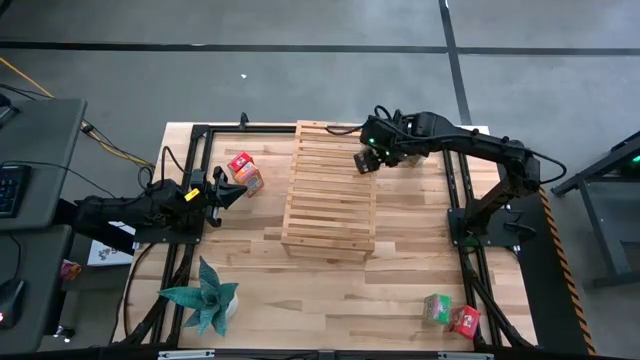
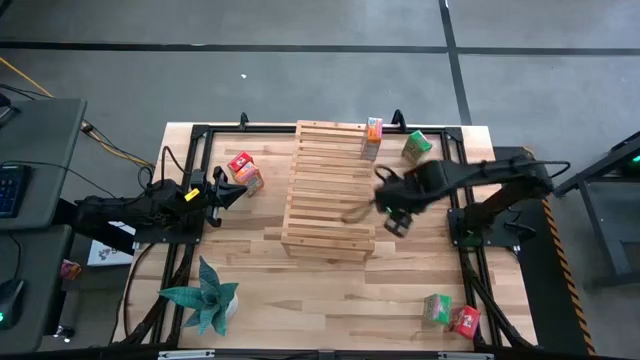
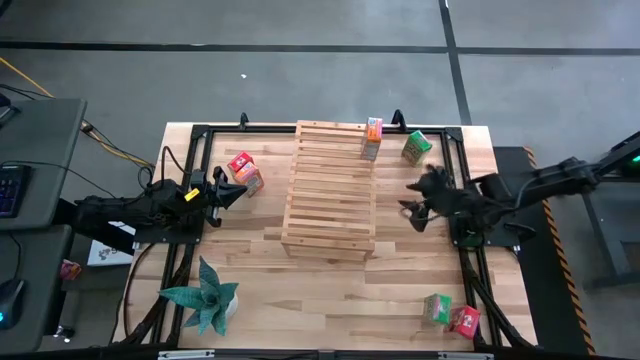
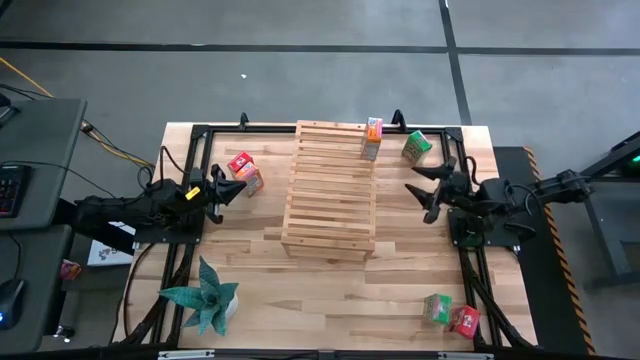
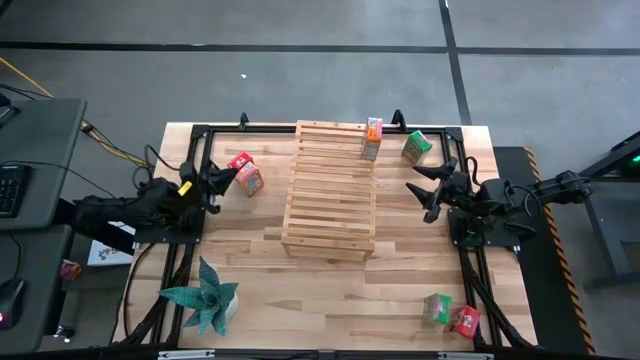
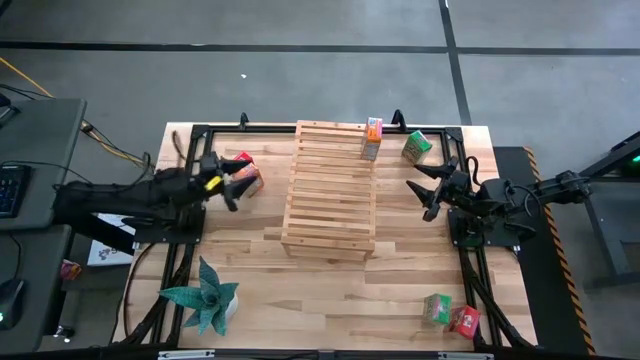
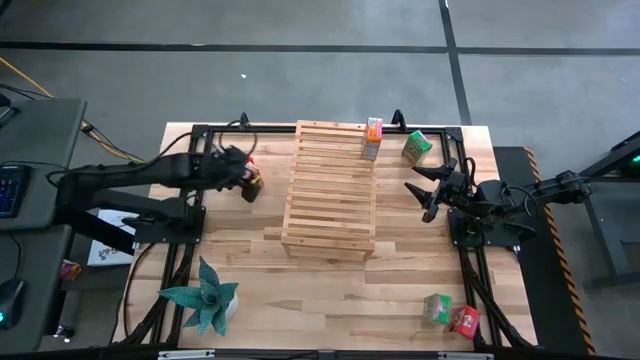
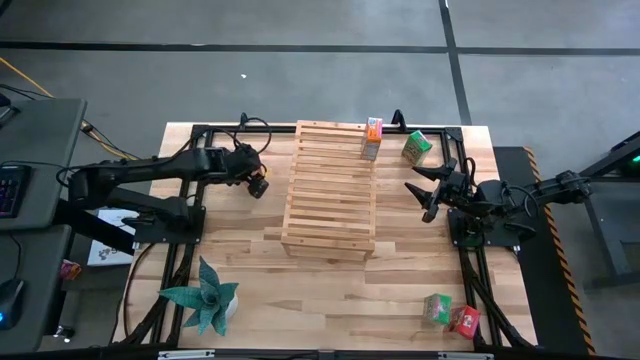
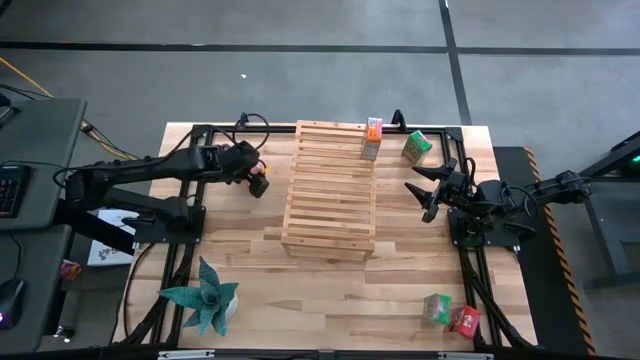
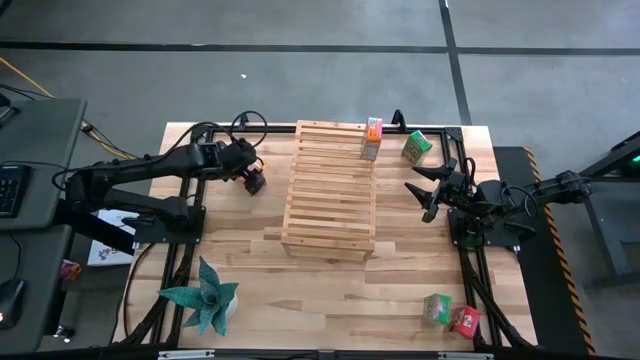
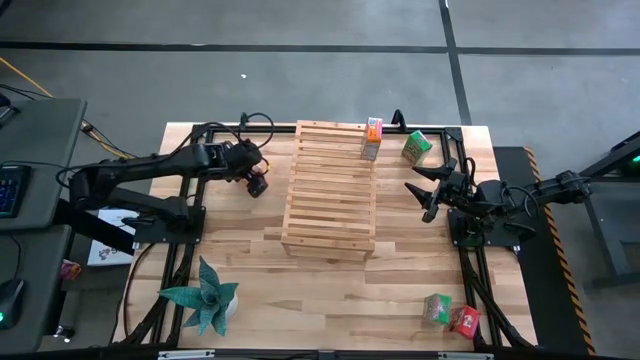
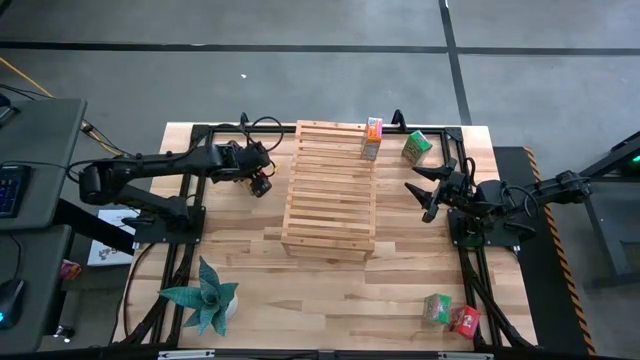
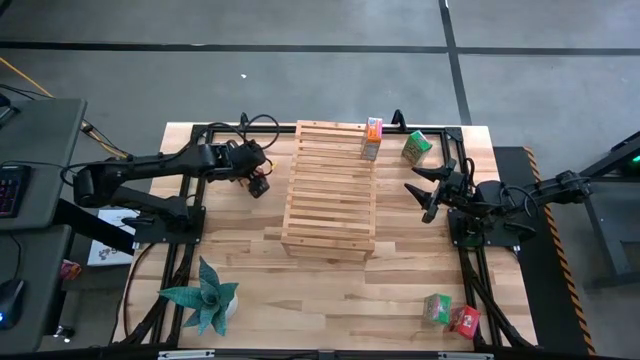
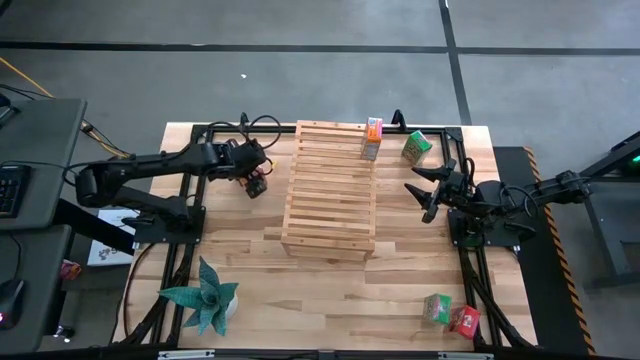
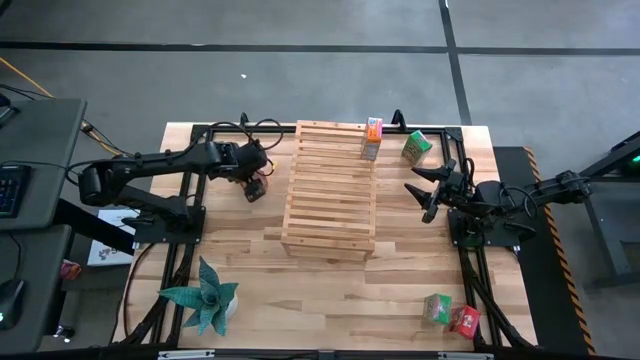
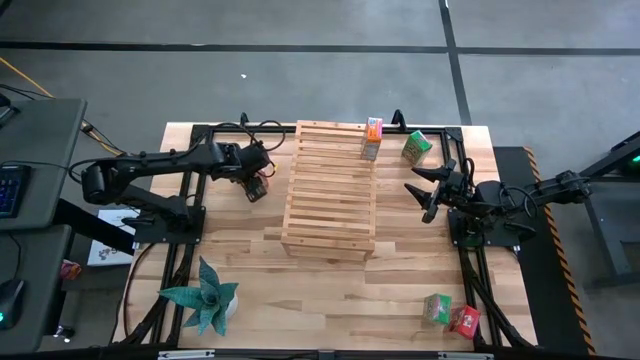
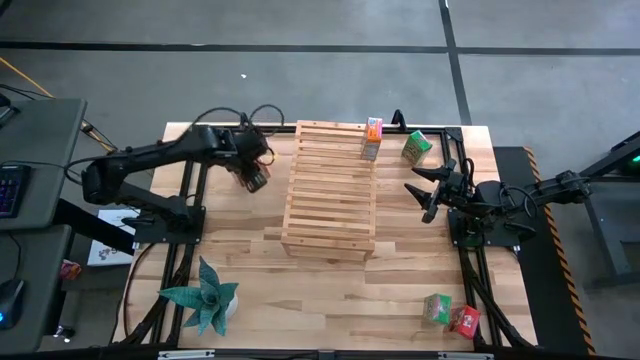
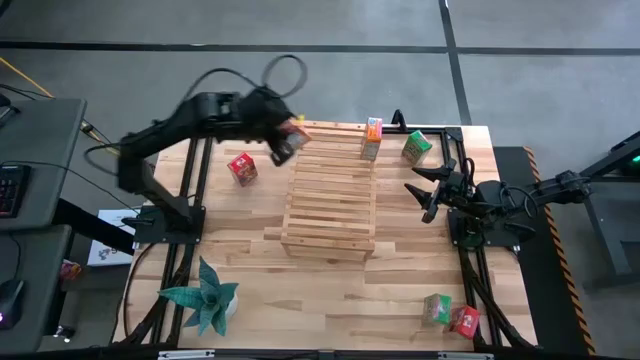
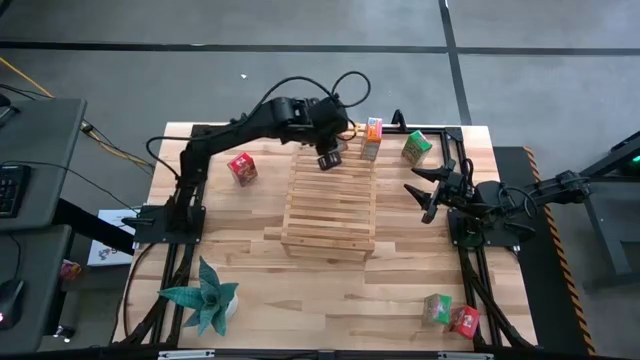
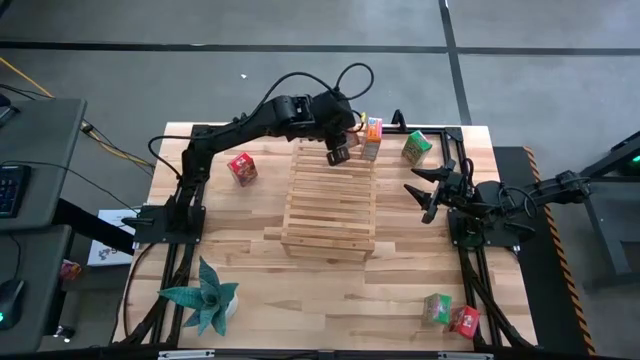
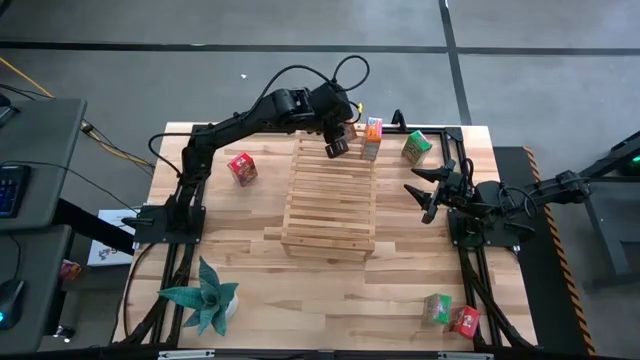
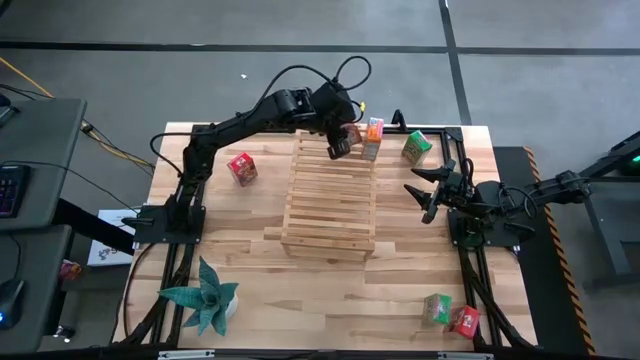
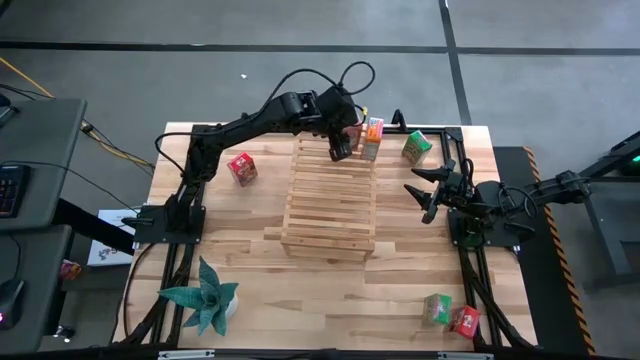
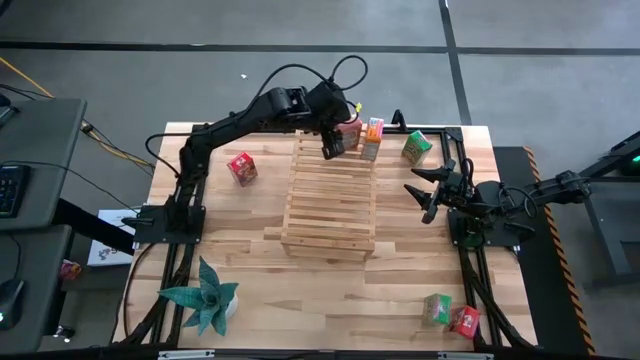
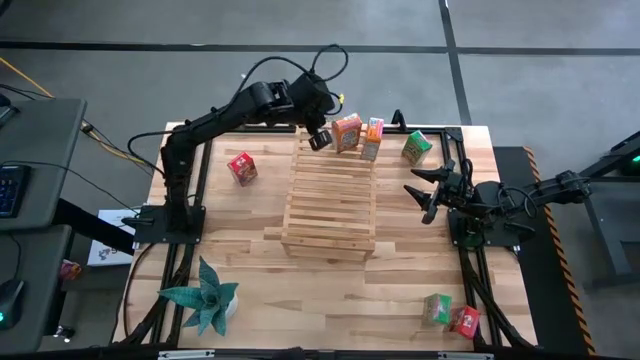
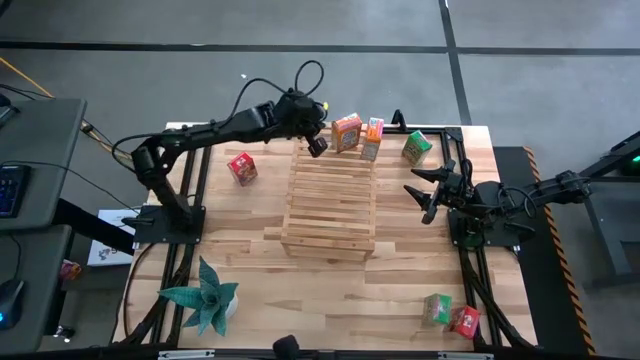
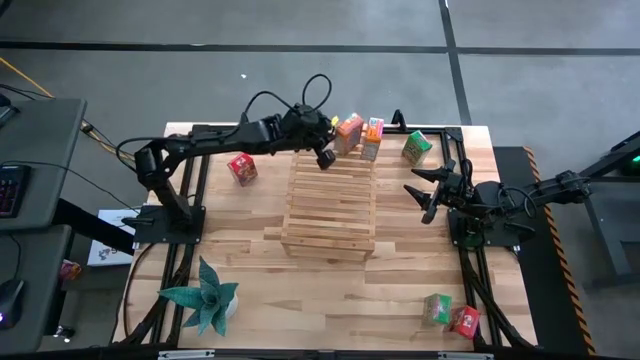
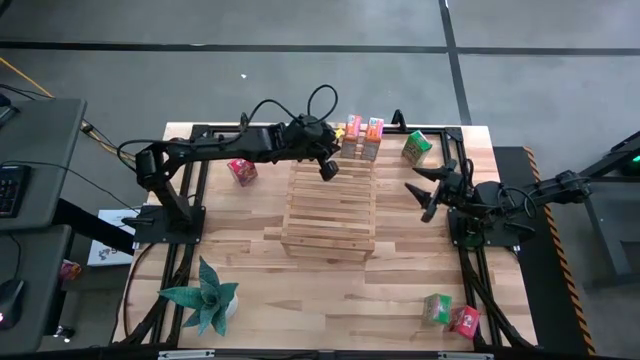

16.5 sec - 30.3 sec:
Task: Stack cereal on shelf
Put the orange cereal box on the shelf aligned with the orange box

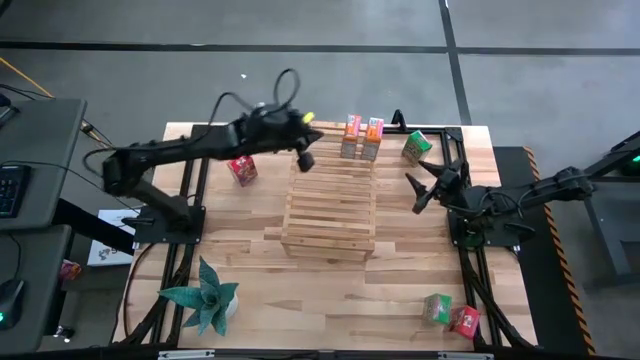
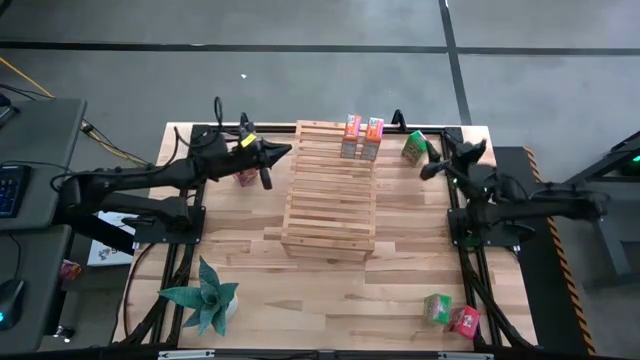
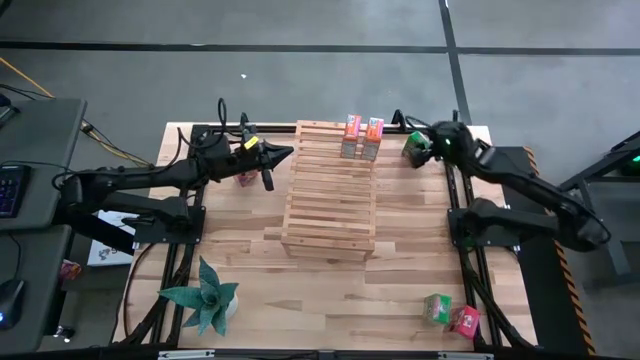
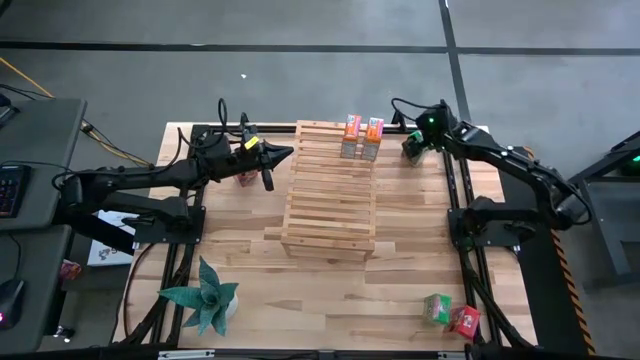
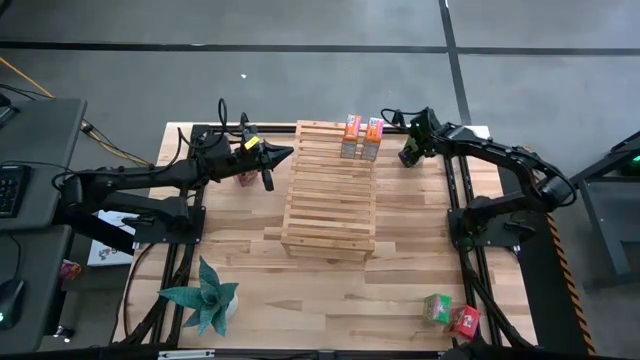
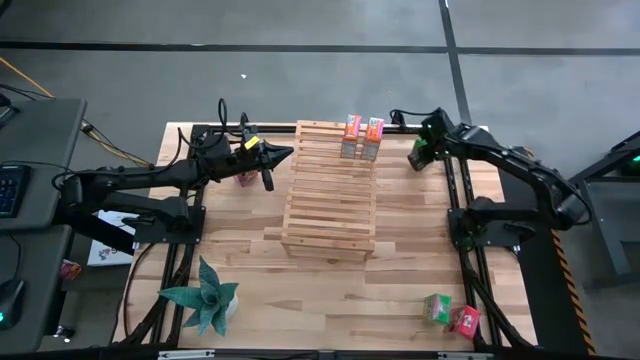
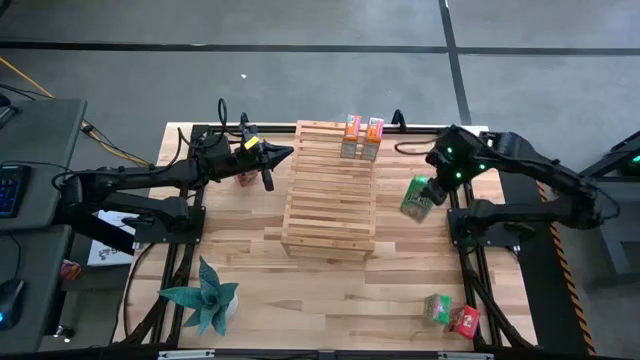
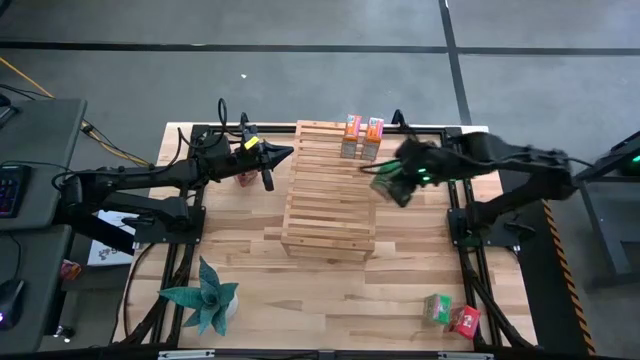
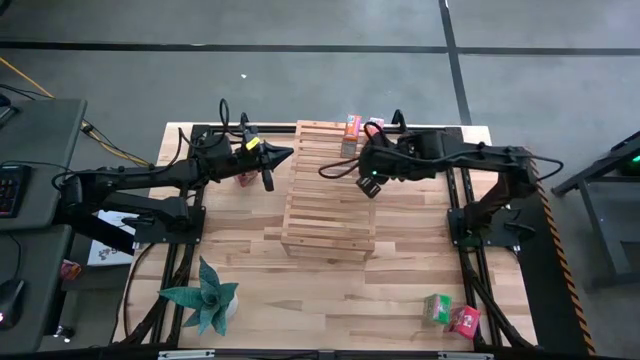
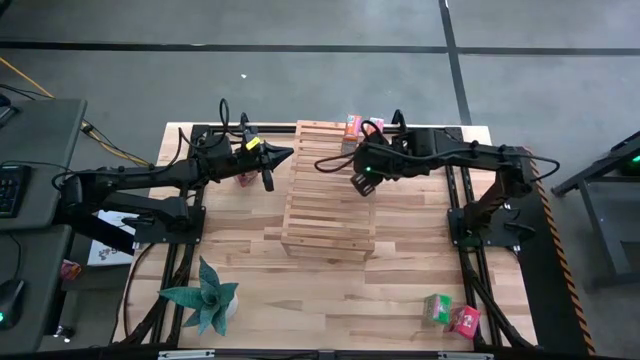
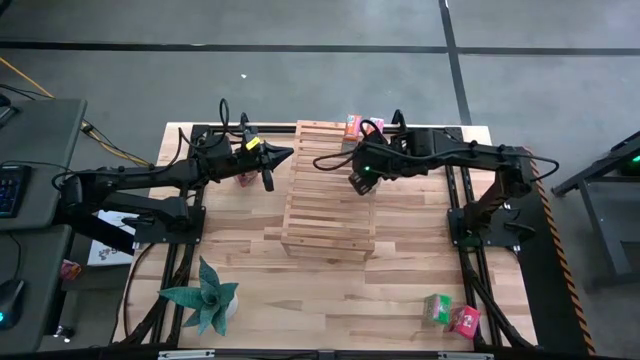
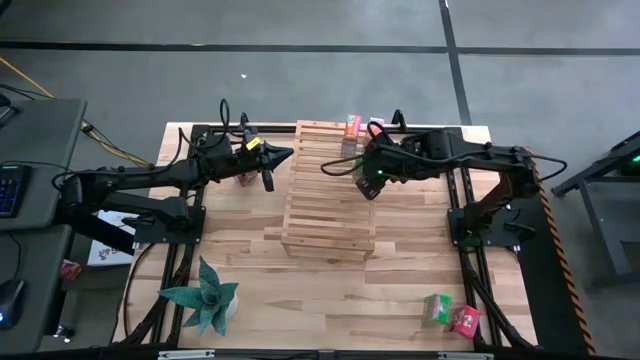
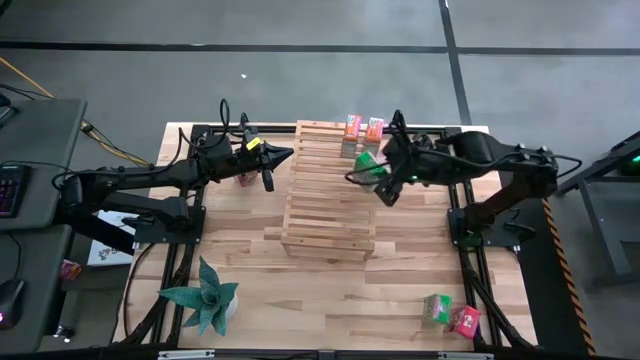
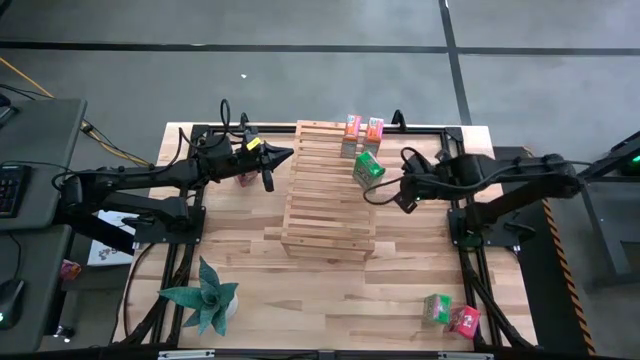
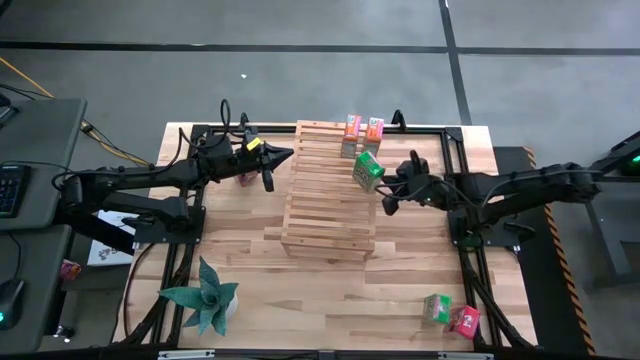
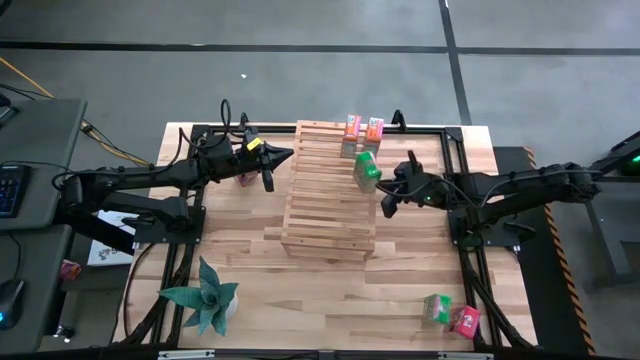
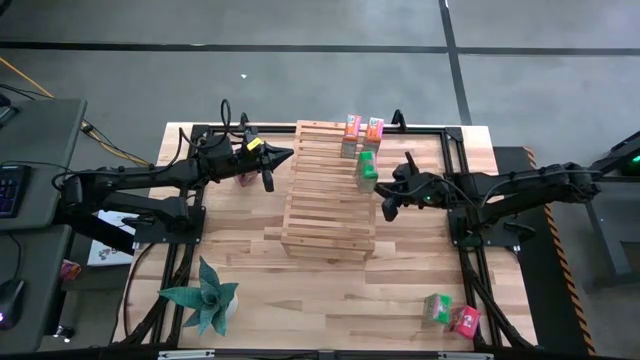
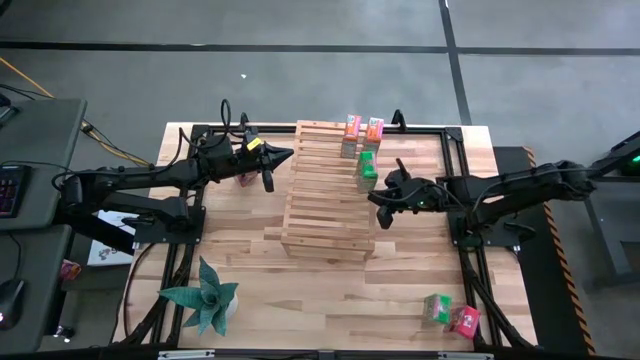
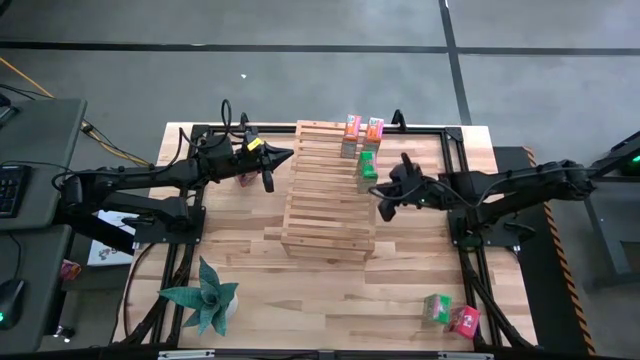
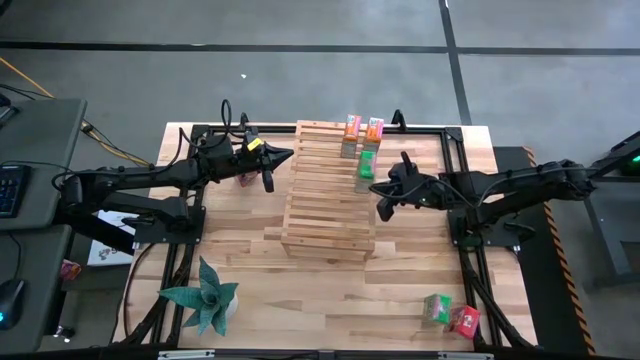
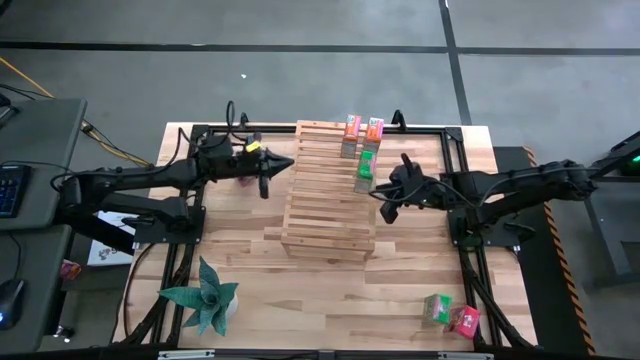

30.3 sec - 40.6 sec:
Put the top green cereal box on the shelf
